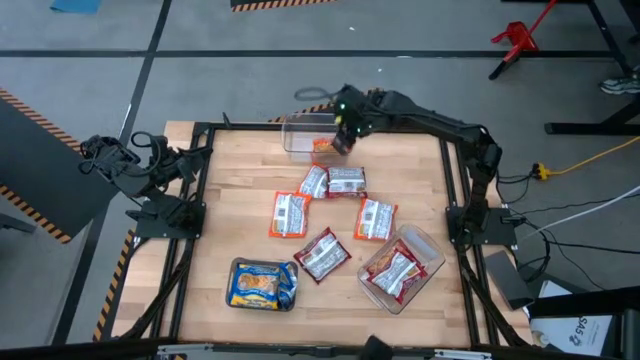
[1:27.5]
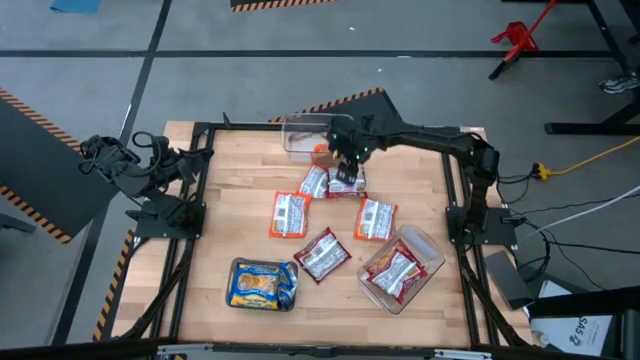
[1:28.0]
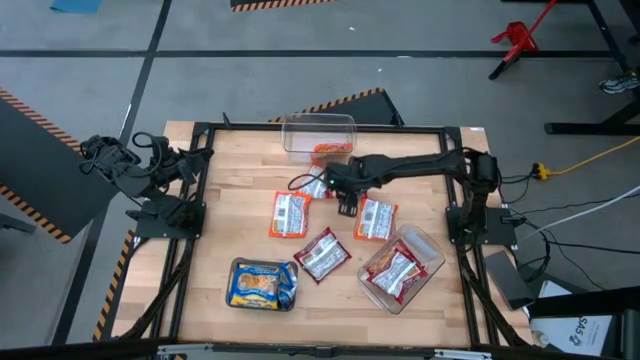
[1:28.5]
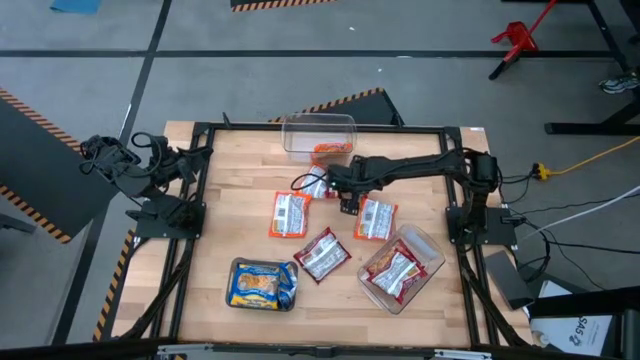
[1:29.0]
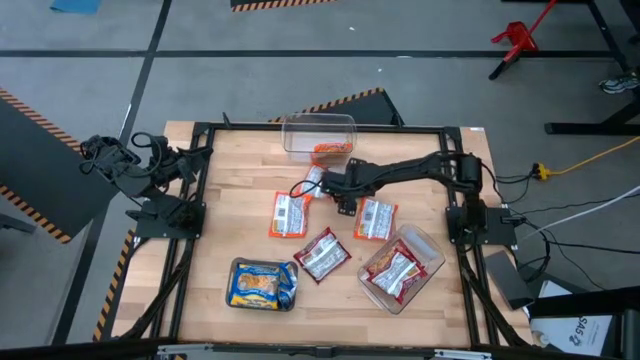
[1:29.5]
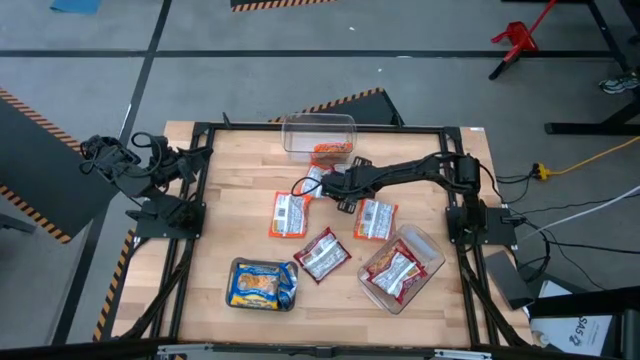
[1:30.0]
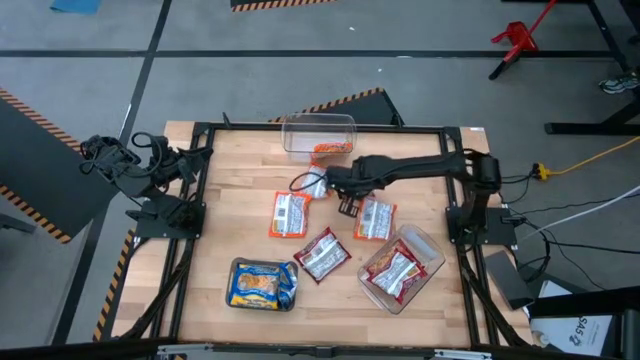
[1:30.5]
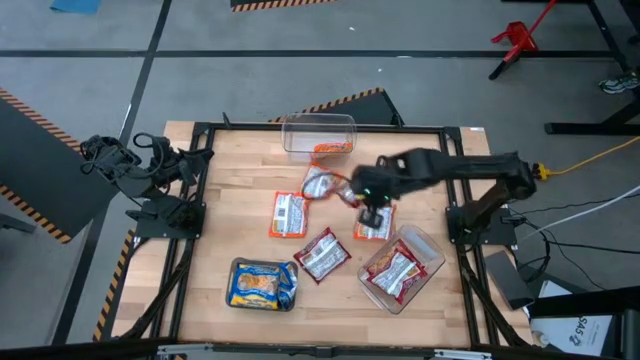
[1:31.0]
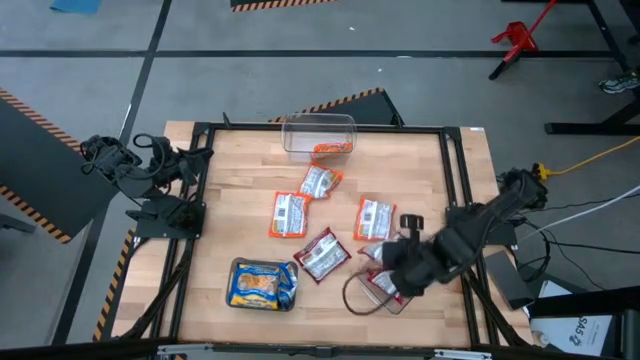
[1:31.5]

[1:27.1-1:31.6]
Task: Sort Maruchan noodles
Put the red noodle pack into the bottom transparent bin

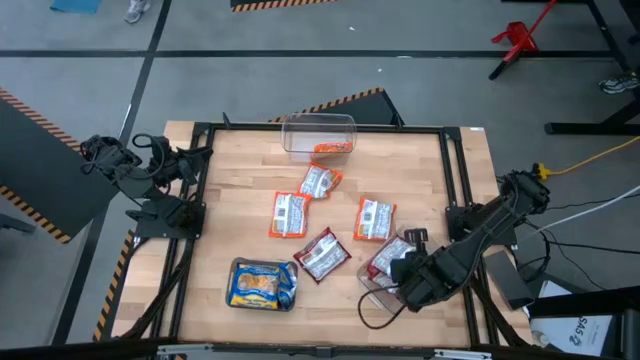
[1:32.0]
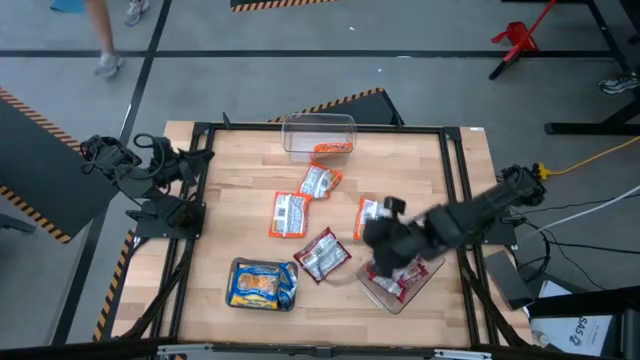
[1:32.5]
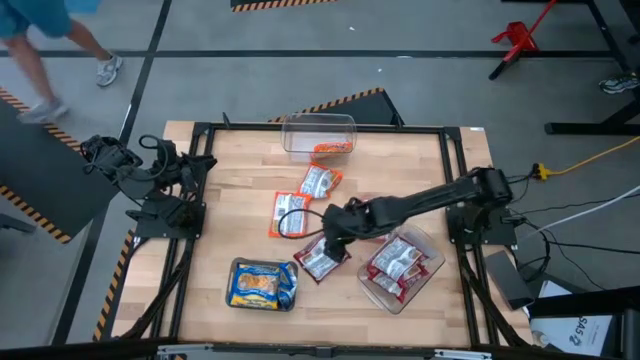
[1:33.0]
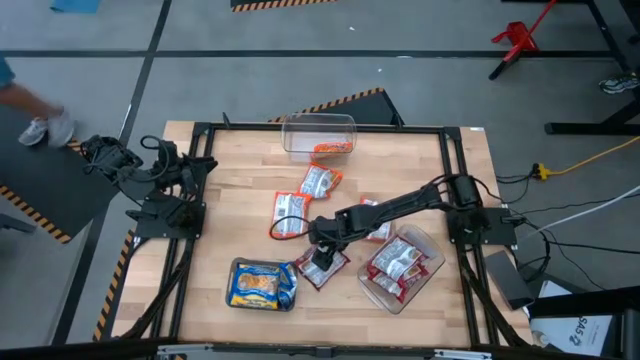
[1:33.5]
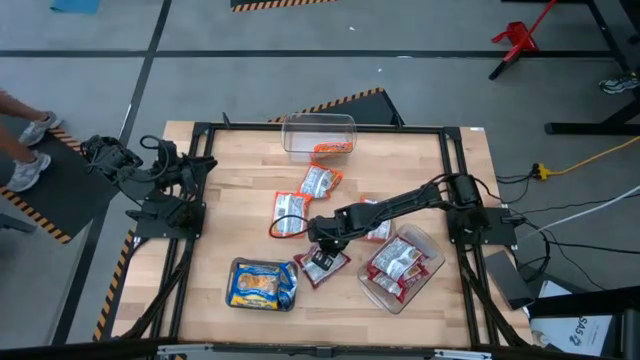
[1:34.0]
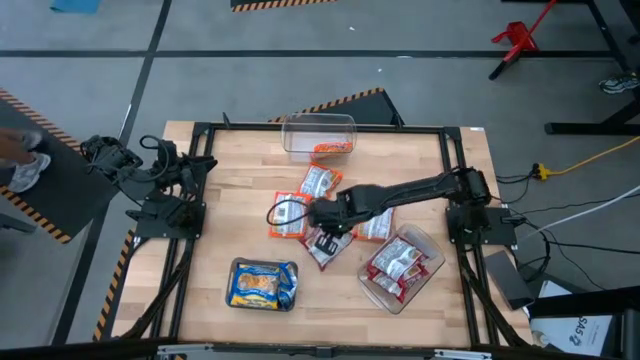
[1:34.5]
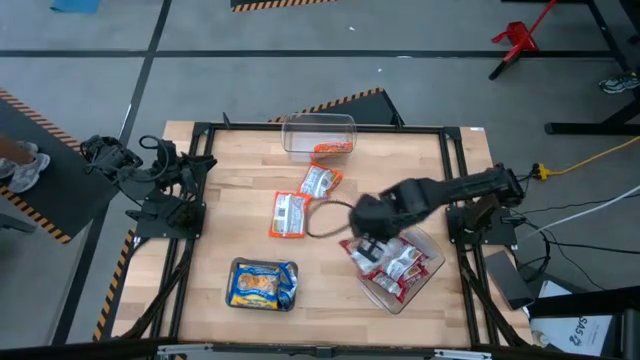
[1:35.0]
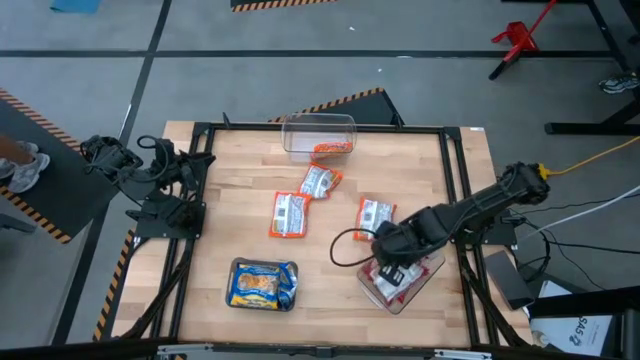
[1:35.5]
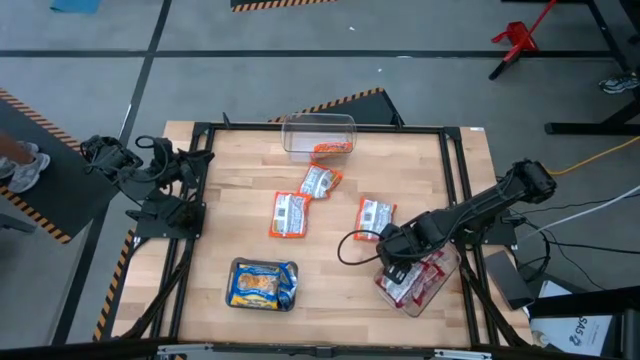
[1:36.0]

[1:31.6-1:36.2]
Put the red noodle pack into the bottom transparent bin

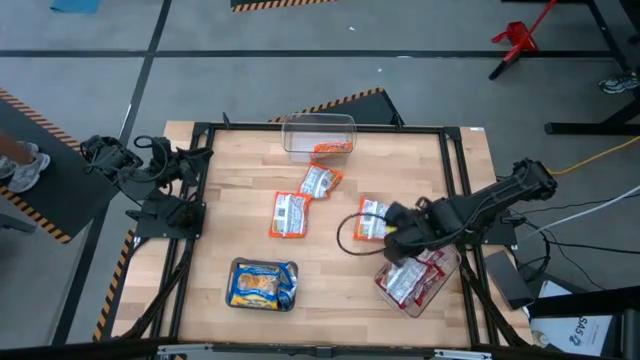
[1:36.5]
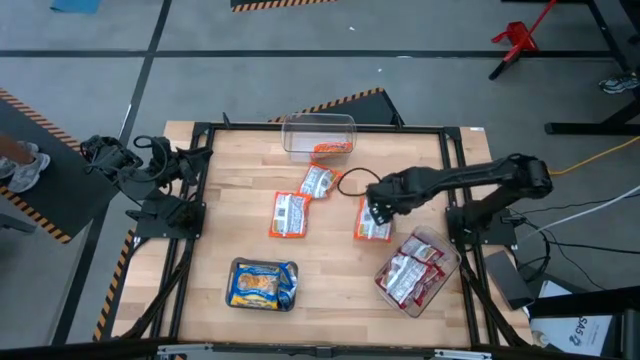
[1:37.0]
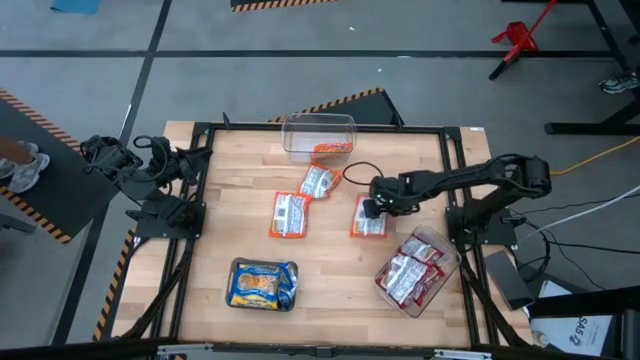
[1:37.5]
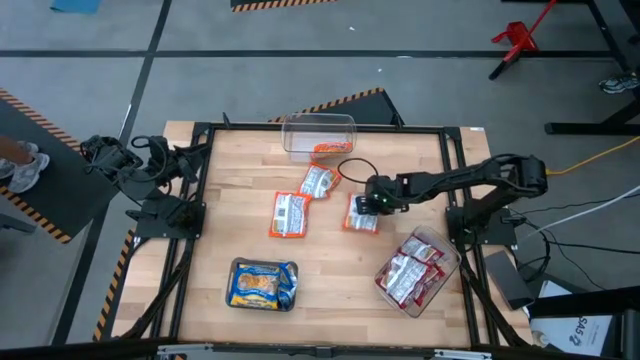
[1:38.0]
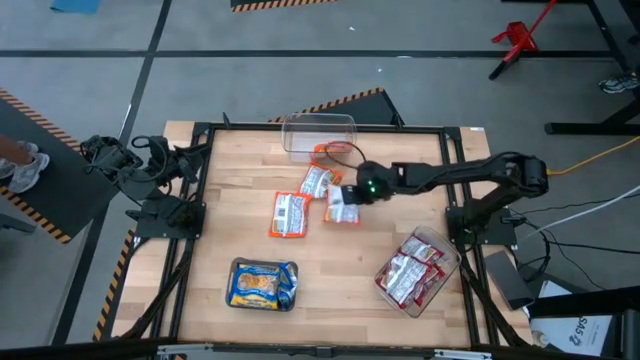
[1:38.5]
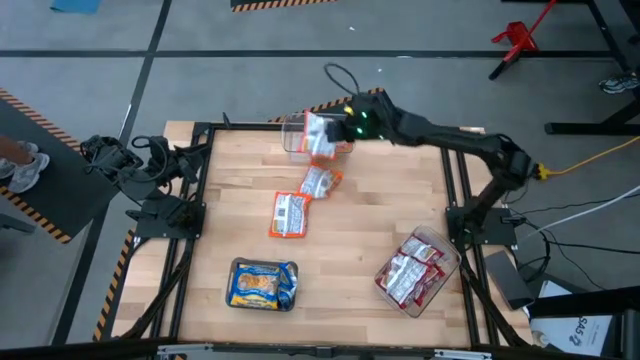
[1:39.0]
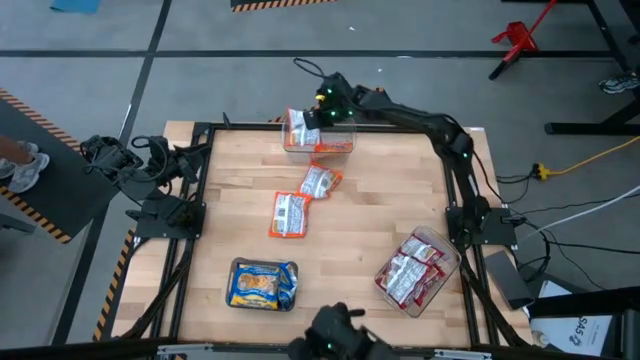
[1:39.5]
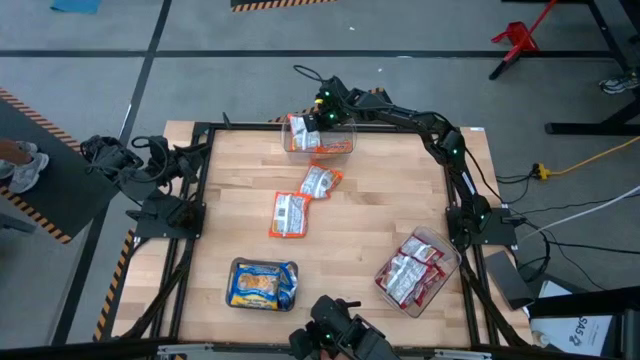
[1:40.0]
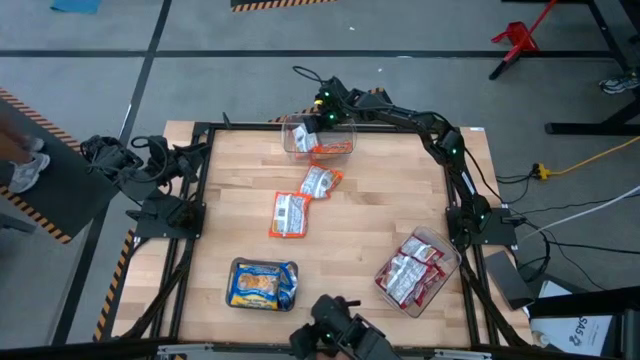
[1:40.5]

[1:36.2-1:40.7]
Put the orange noodle pack into the top transparent bin

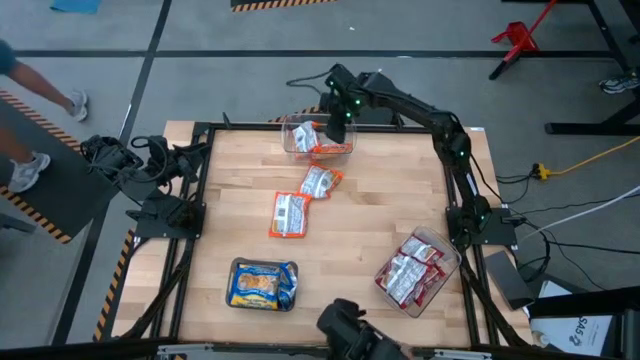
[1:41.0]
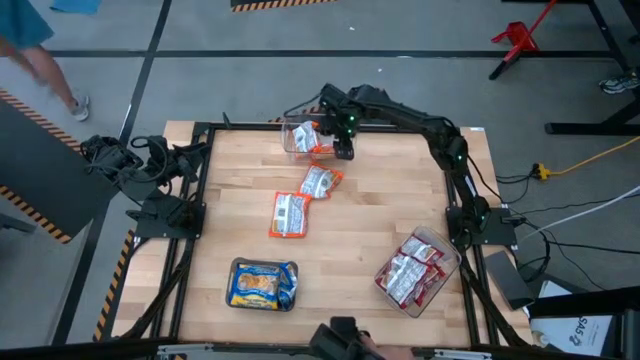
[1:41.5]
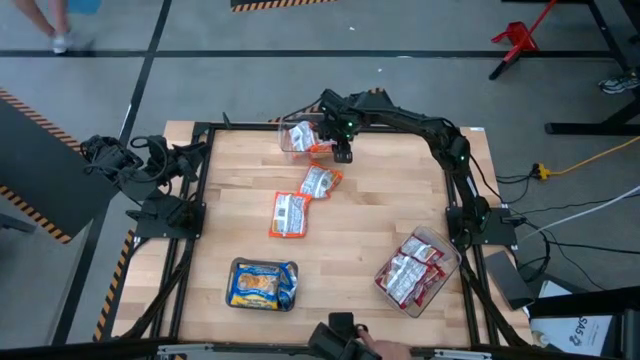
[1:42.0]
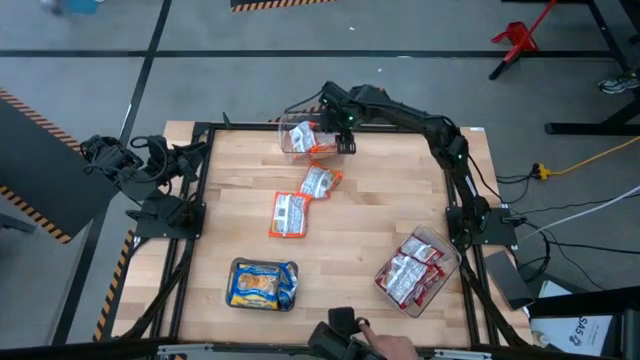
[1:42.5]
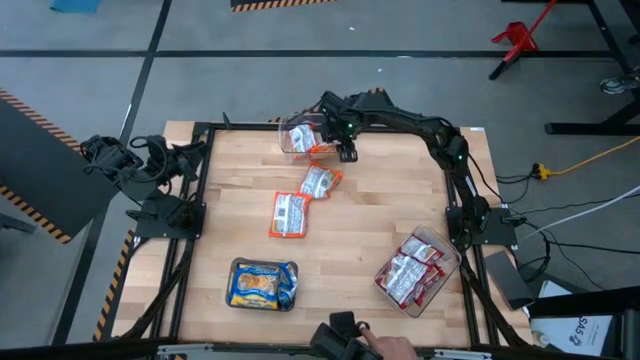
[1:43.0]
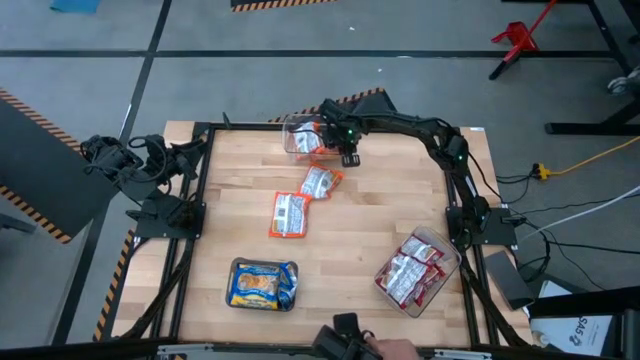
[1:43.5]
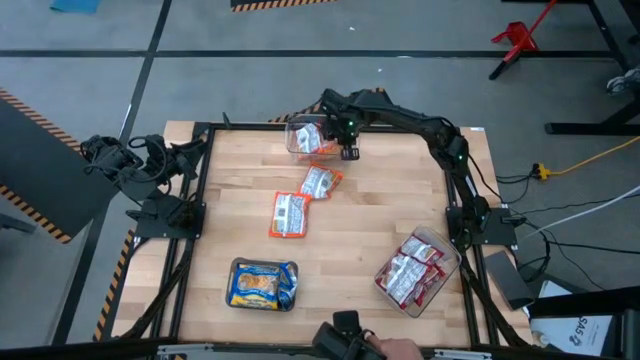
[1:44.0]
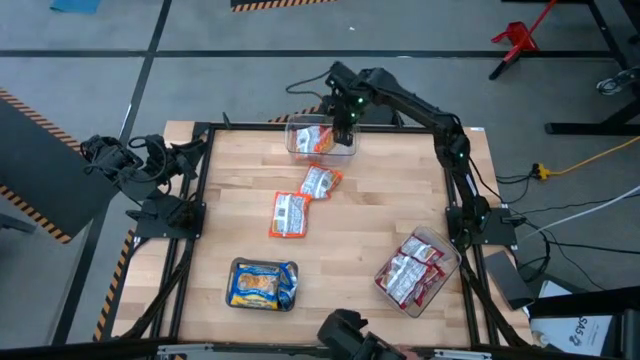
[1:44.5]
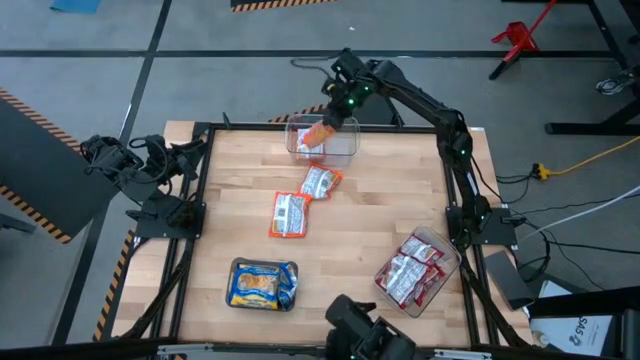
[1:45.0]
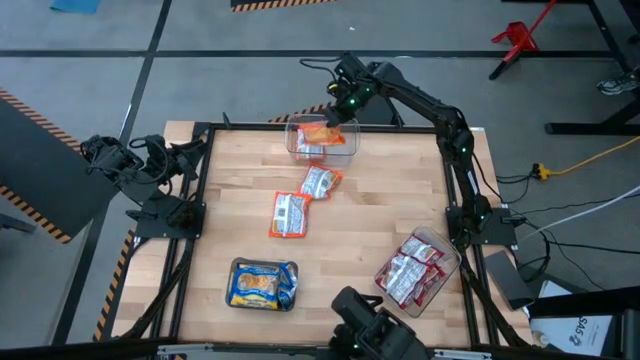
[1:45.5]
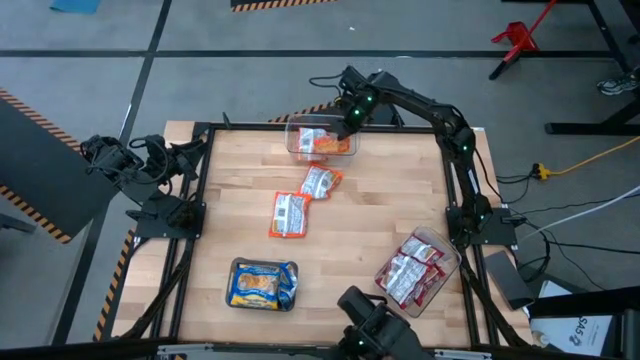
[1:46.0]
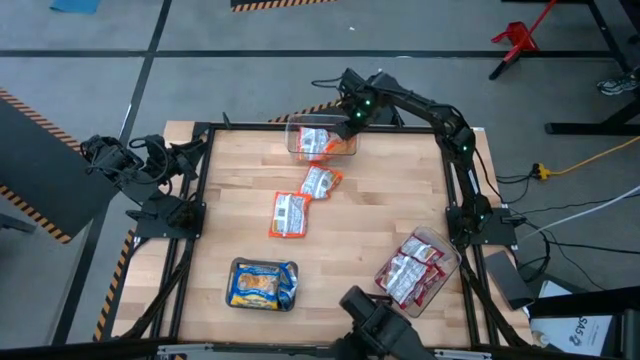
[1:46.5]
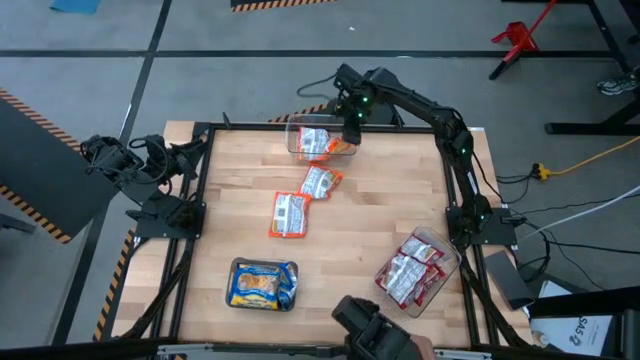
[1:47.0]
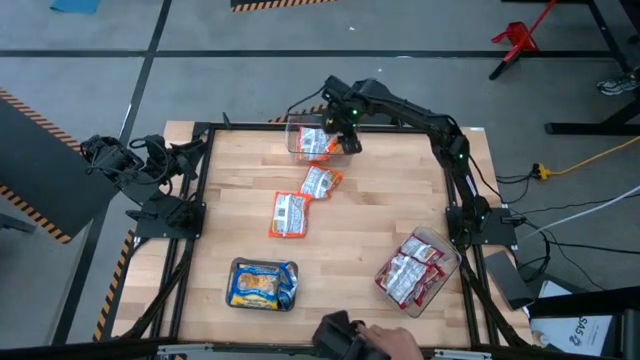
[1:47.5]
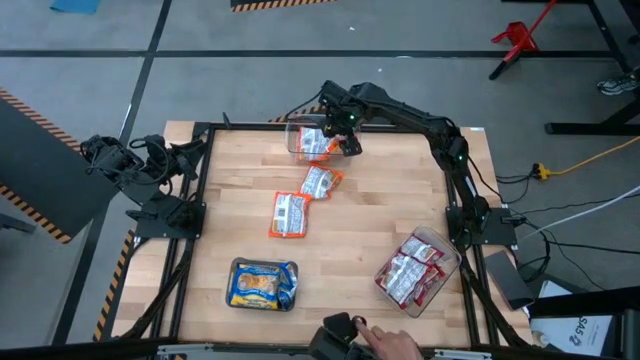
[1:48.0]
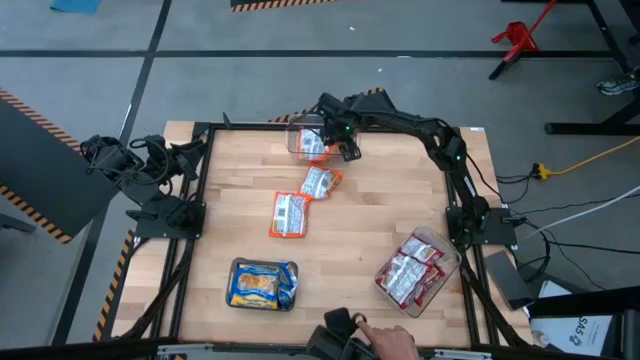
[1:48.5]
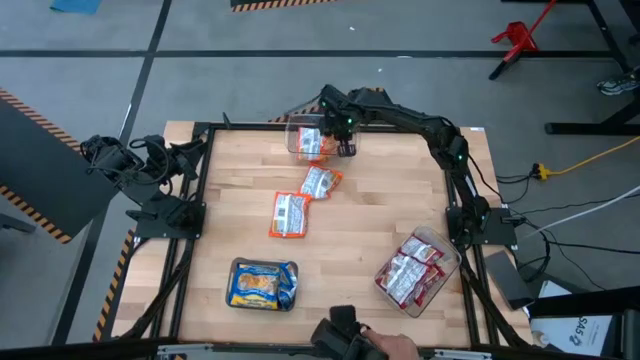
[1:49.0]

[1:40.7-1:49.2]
Adjust the orange noodle pack in the top transparent bin

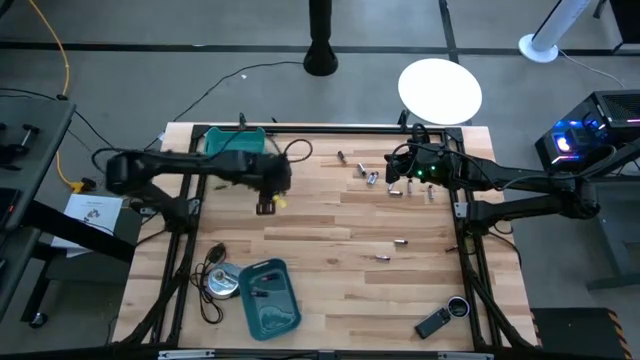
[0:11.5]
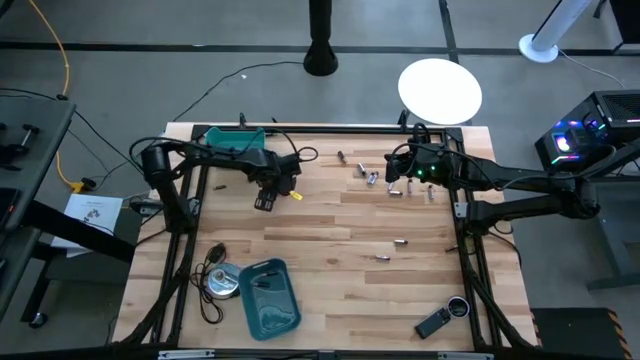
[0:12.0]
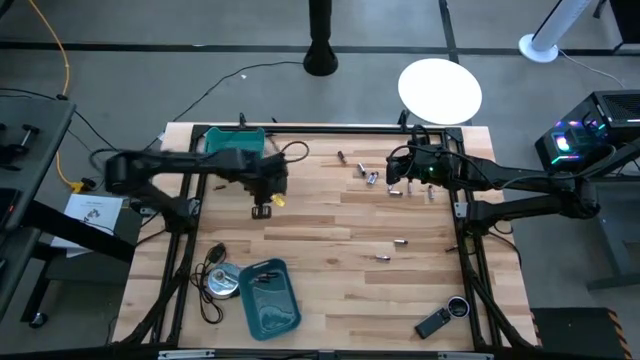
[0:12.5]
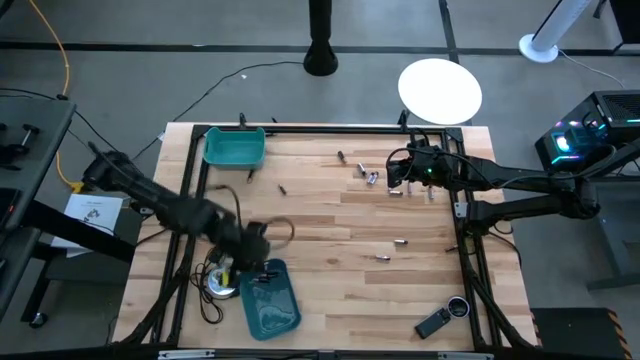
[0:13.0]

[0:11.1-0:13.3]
Task: Sort batteries
Put the black battery into the blue bin
